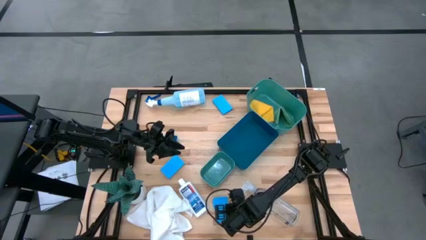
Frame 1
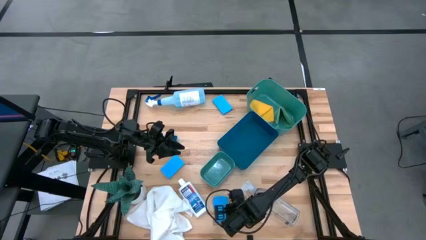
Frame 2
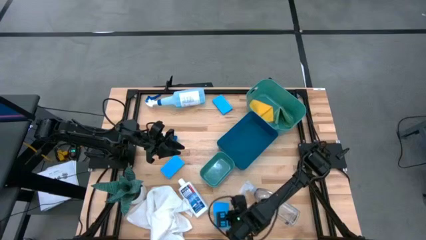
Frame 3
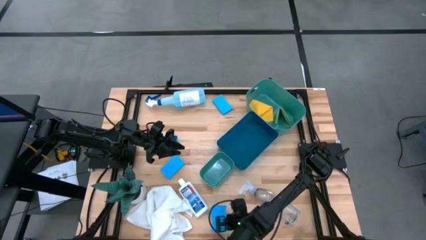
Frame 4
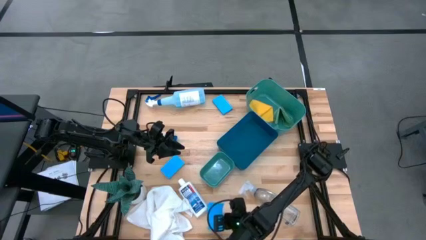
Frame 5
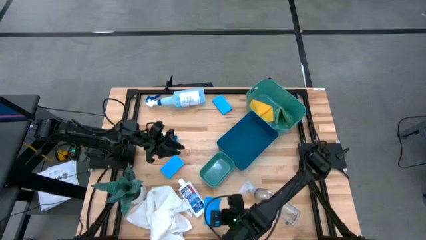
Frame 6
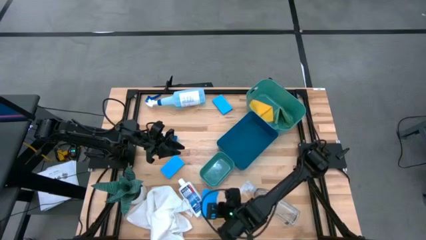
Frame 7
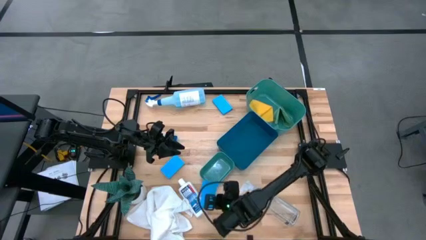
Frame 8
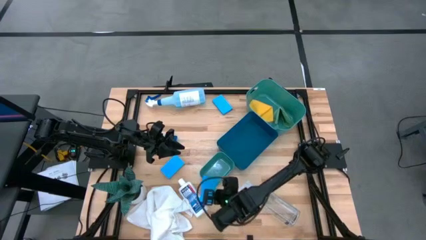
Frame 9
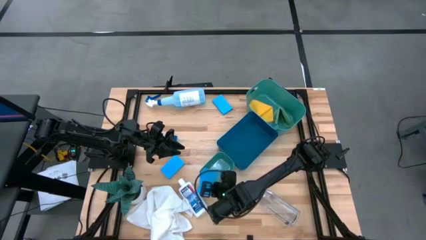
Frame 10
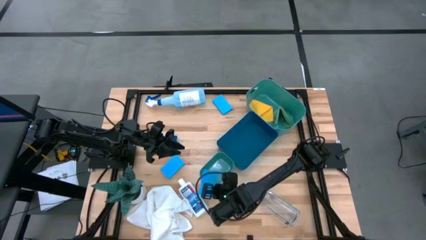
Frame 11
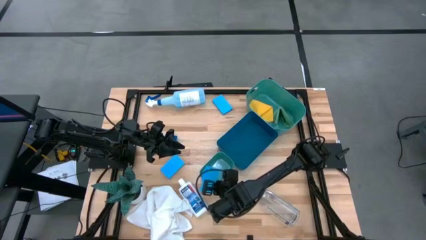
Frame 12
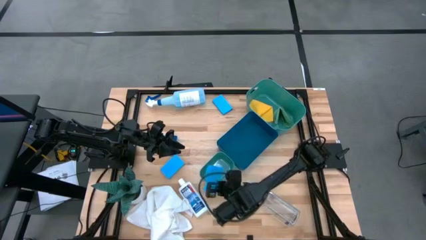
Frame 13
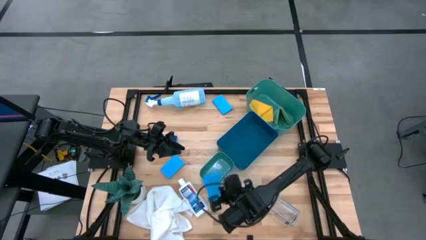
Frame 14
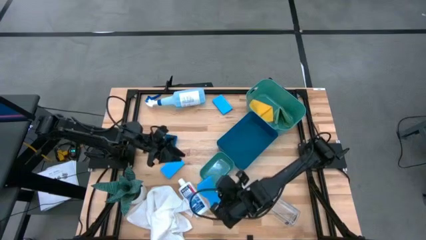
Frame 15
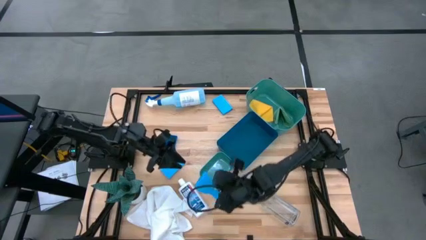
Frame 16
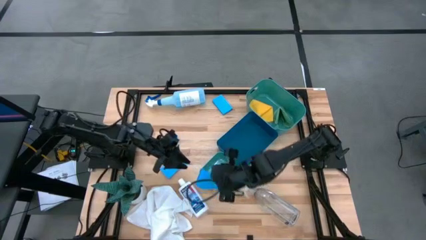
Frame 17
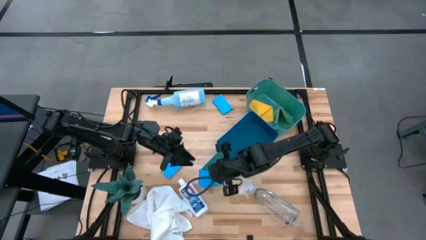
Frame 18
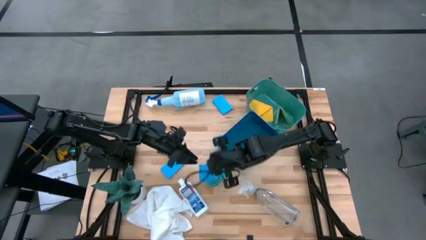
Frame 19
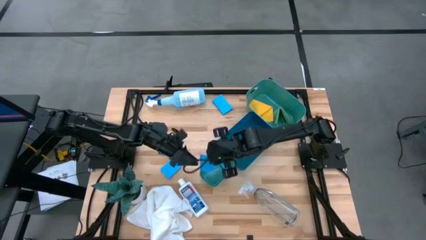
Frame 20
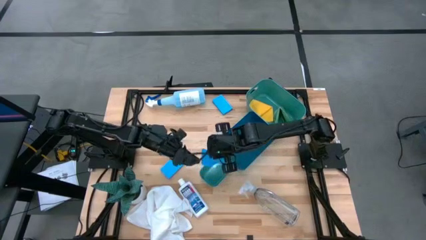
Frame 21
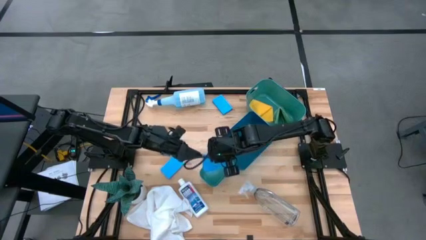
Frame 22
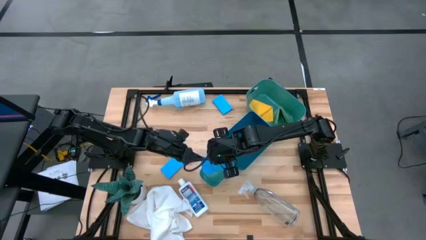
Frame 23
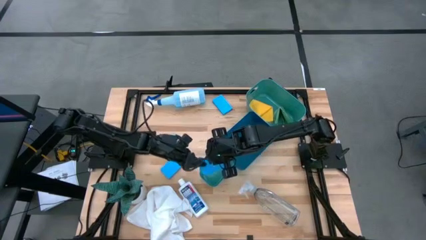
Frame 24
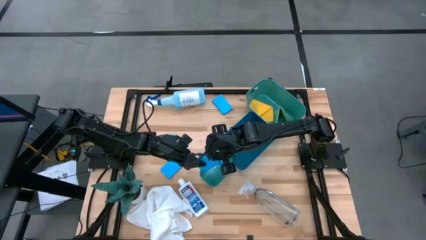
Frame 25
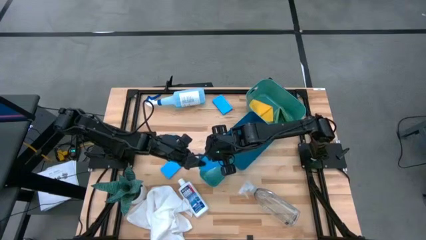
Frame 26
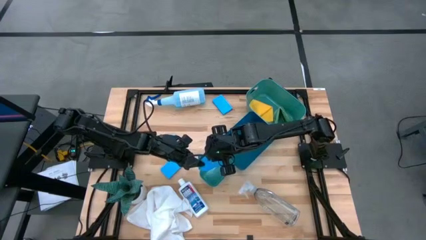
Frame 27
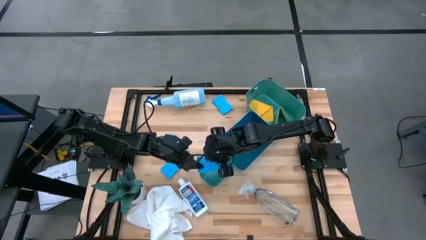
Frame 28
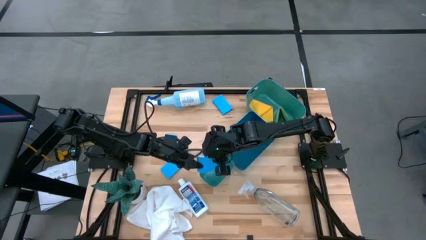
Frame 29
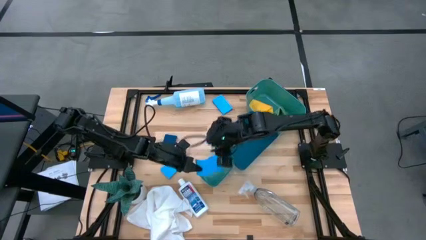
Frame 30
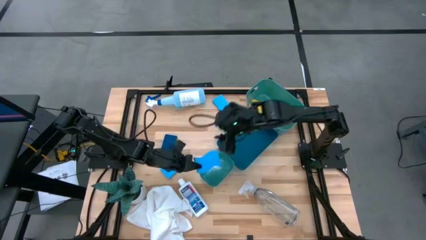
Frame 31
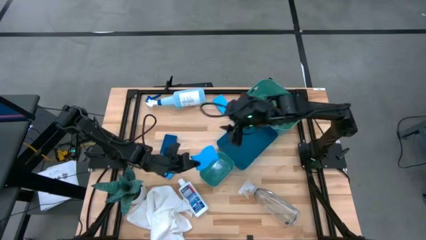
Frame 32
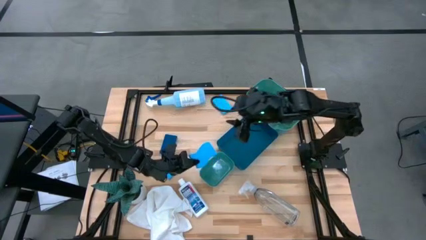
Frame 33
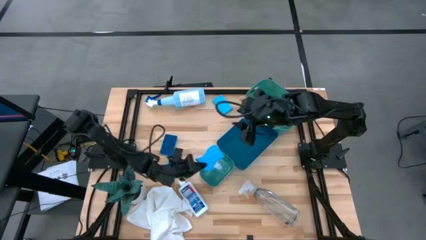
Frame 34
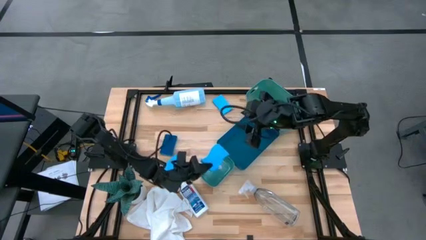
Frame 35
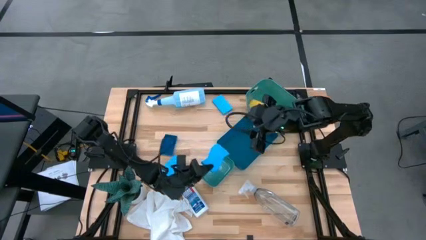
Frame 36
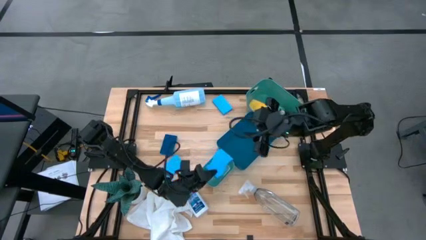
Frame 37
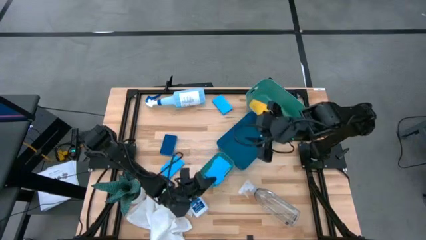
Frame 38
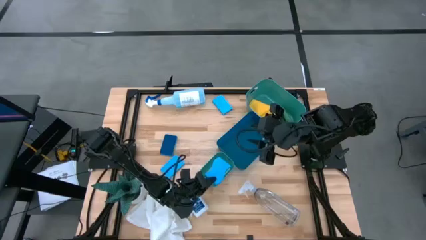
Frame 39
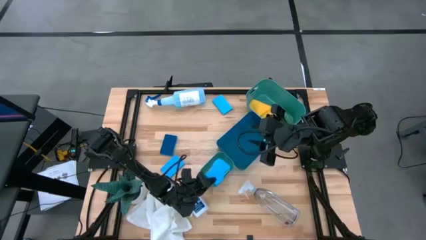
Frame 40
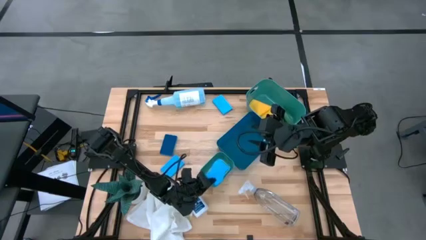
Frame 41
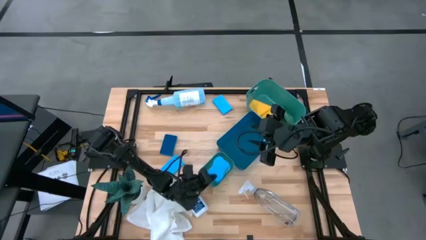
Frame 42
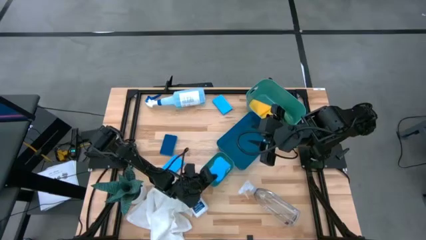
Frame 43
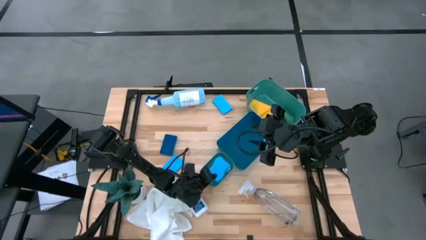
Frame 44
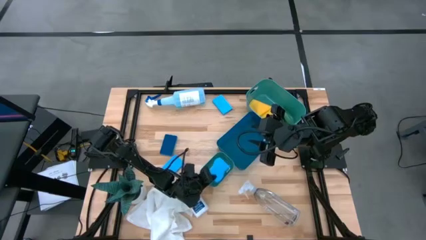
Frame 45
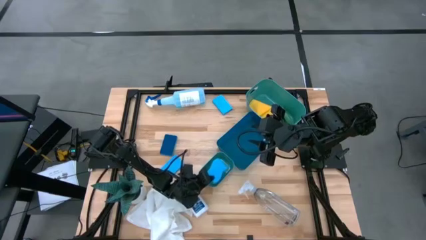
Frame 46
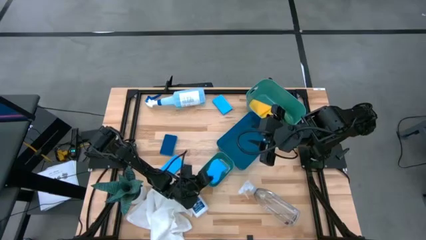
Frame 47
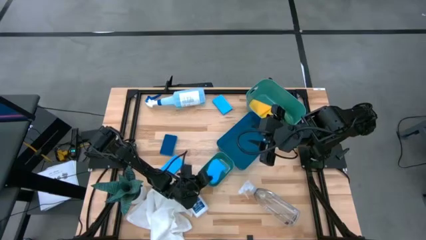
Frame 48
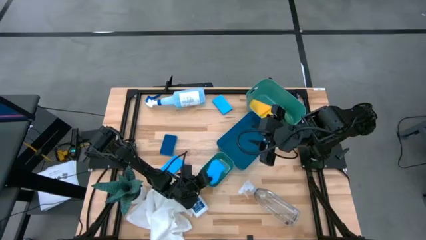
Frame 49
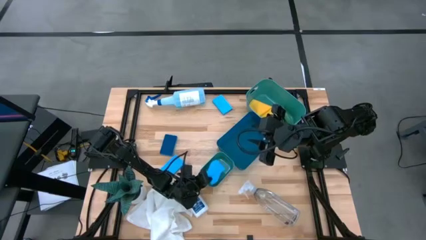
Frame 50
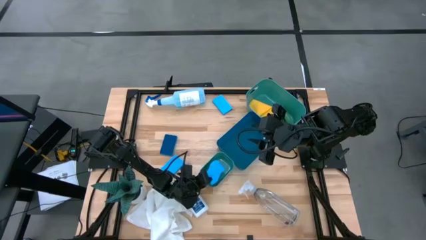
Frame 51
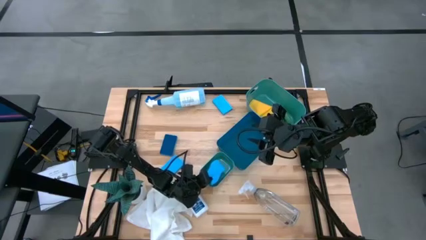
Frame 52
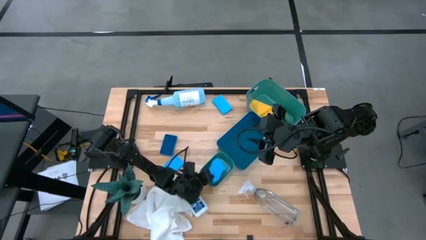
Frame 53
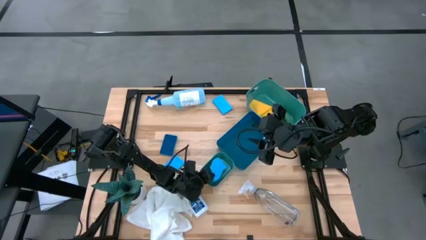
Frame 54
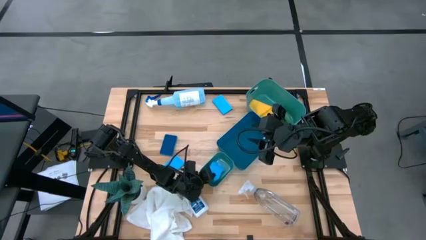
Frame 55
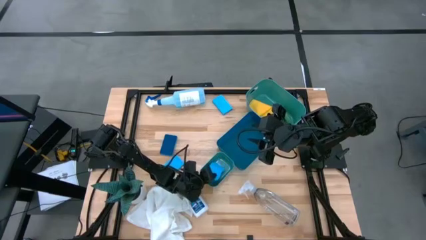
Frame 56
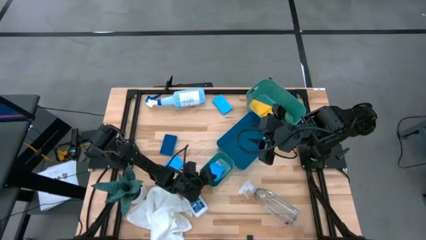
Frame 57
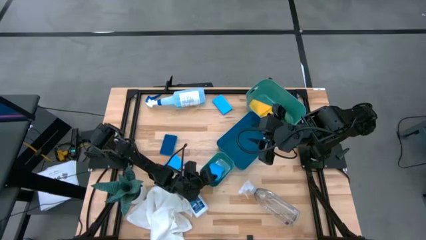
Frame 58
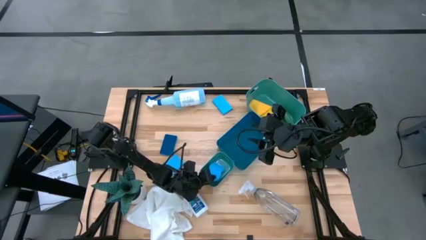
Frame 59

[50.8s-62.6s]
Task: Pick & Place Kitchen Items
Put the bottom right light blue sponge into the bottom green bin

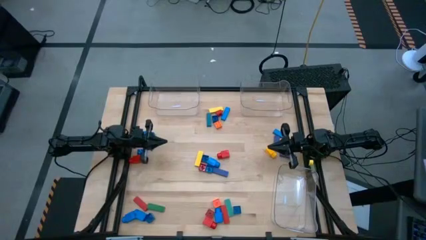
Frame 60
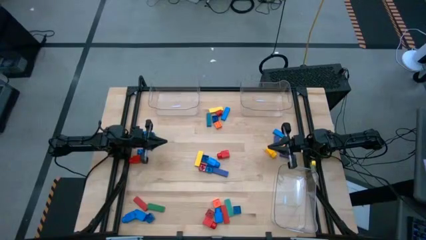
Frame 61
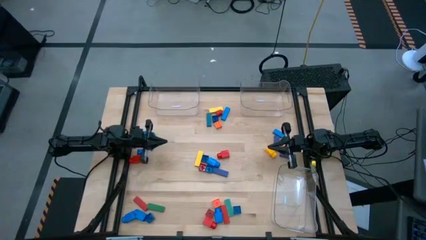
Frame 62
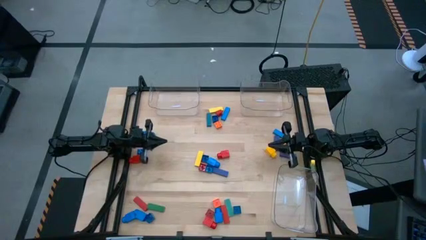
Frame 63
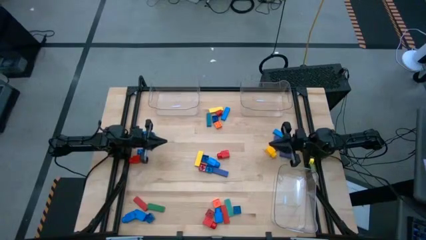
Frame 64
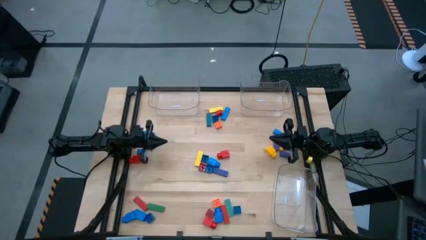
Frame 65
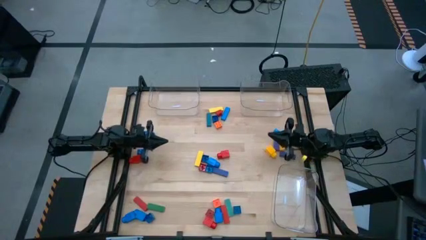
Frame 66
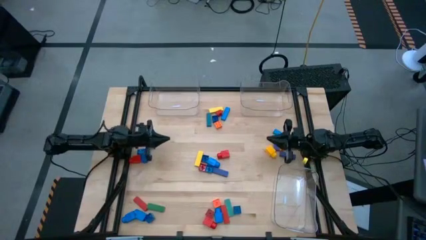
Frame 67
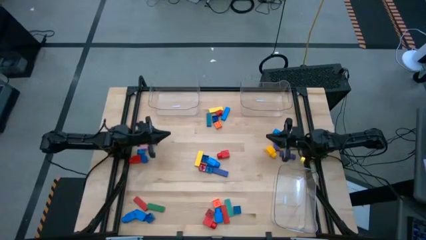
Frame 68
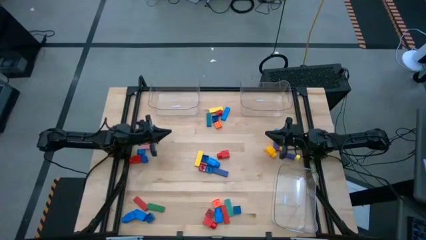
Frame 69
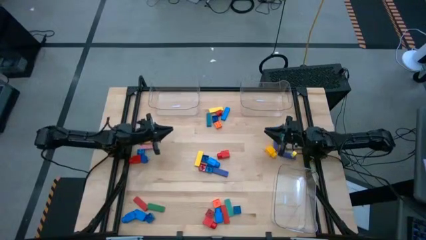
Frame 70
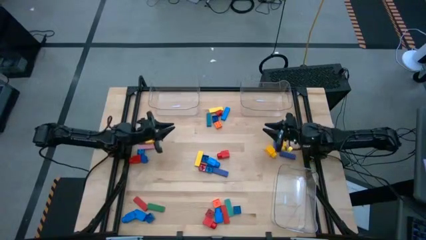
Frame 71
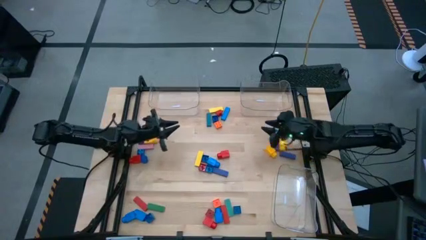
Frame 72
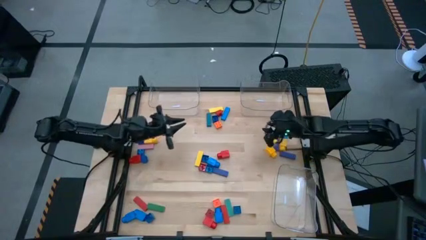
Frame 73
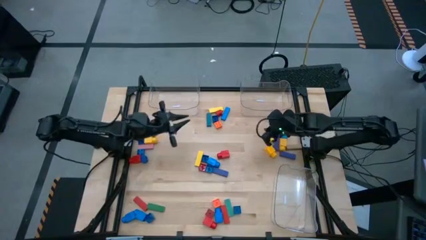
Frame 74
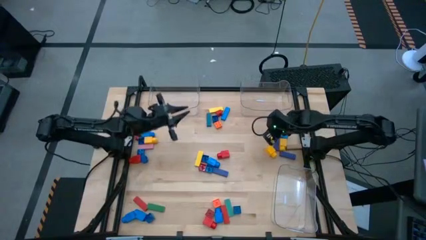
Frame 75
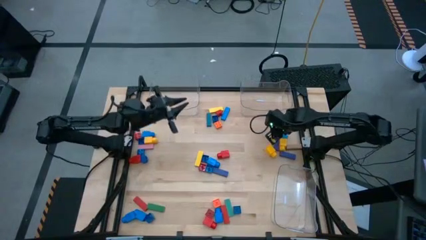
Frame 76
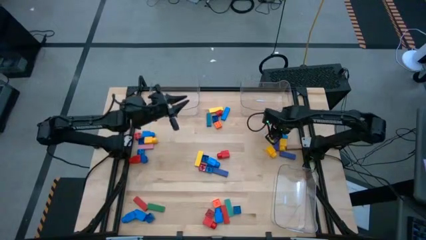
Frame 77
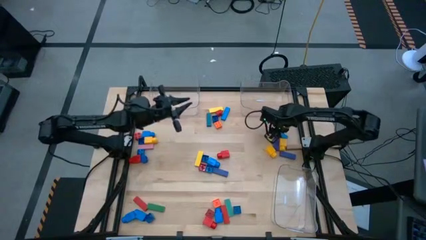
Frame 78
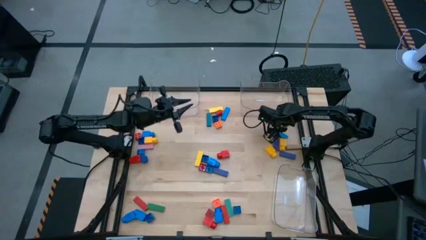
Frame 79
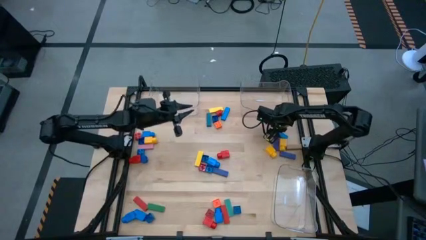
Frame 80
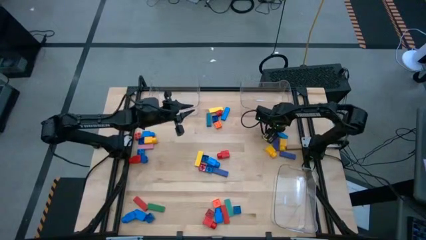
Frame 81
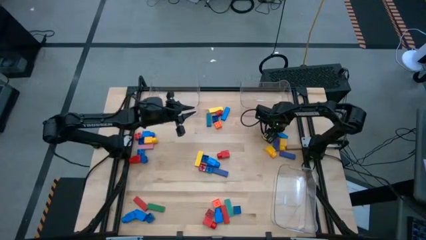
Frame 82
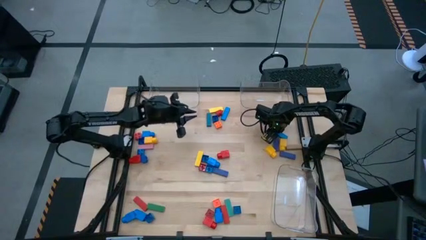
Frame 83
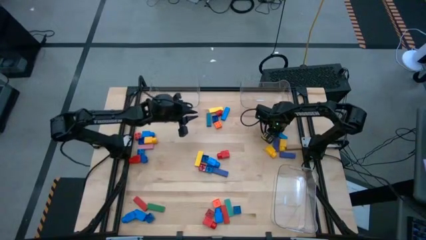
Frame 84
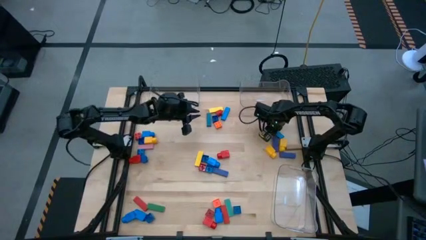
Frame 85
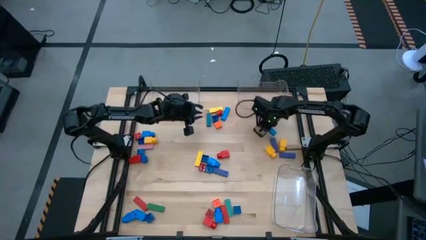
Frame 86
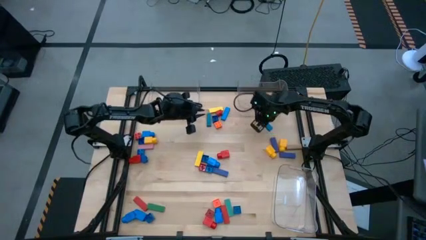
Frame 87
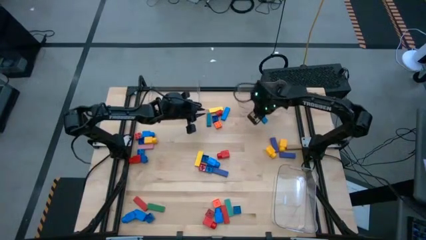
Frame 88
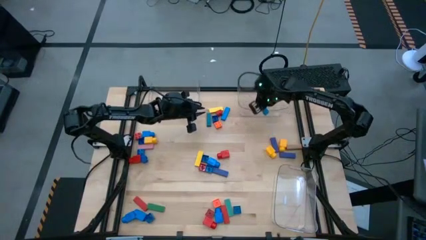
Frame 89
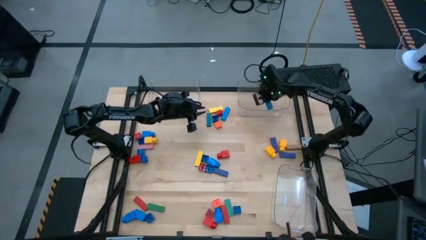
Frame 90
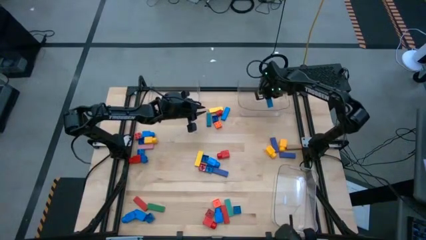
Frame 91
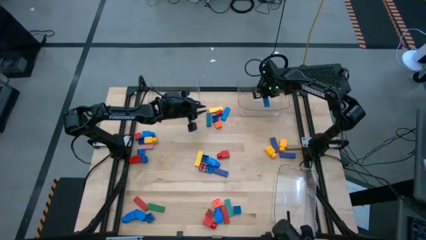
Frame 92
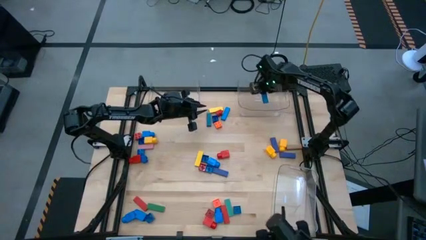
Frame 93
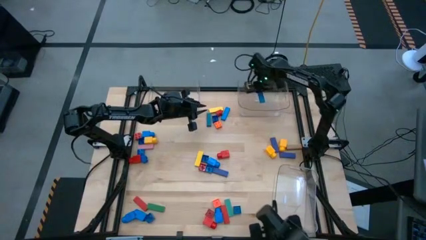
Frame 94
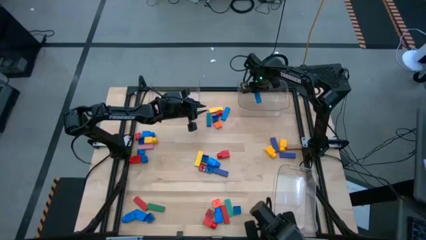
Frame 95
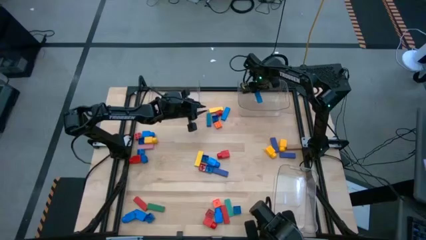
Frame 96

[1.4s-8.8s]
Task: Sort blocks by size
Put the blue block into the top right transparent bin
